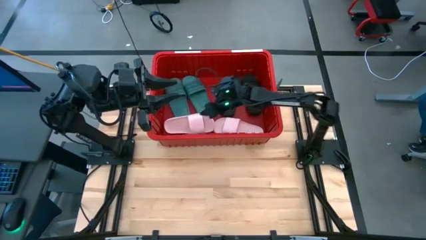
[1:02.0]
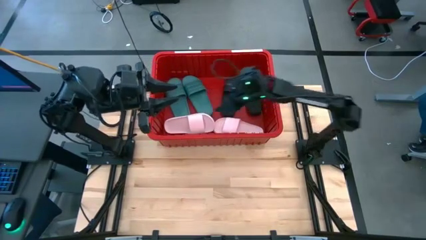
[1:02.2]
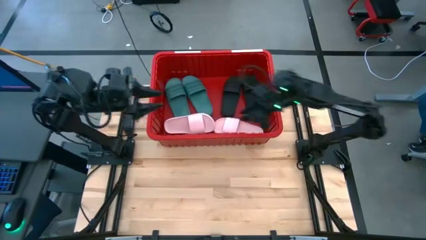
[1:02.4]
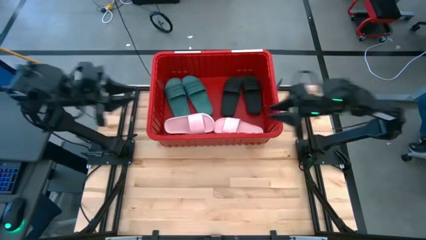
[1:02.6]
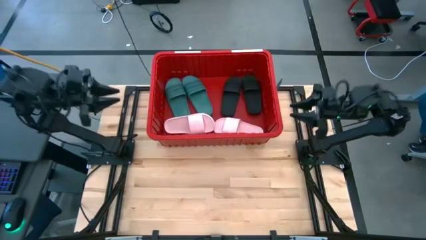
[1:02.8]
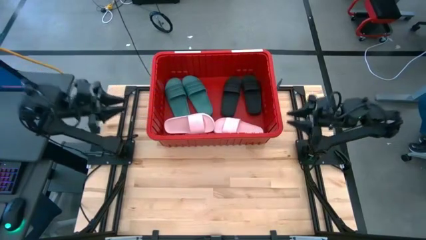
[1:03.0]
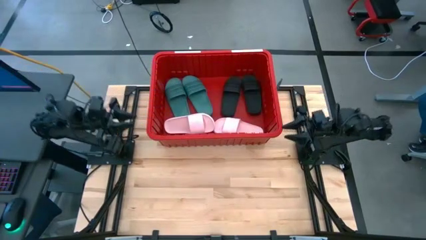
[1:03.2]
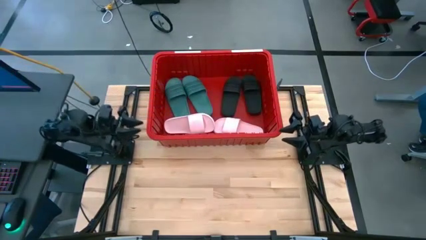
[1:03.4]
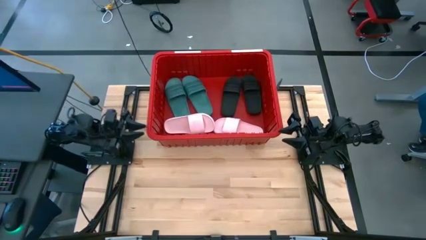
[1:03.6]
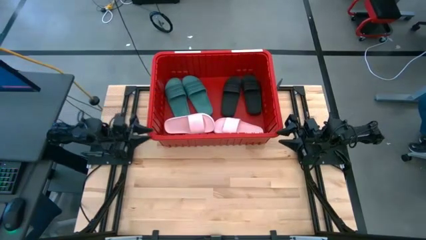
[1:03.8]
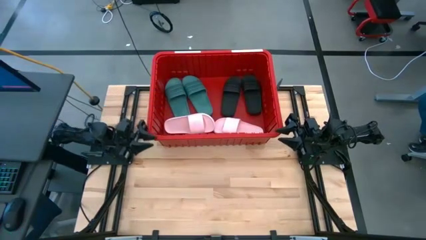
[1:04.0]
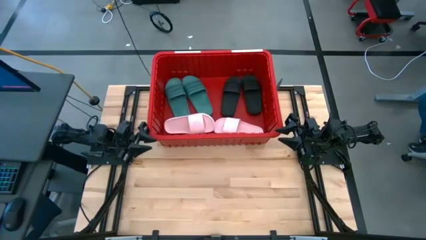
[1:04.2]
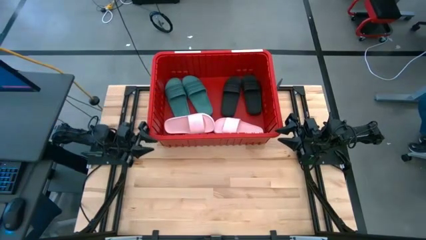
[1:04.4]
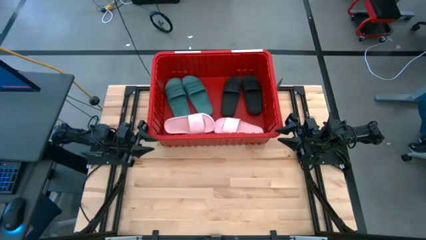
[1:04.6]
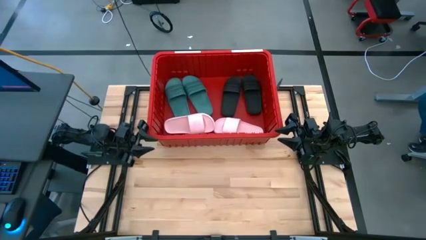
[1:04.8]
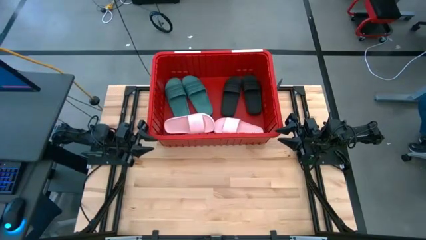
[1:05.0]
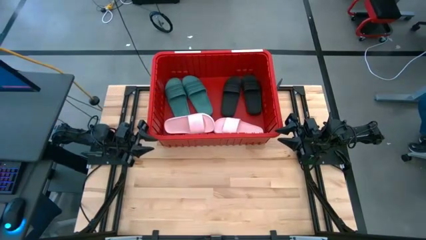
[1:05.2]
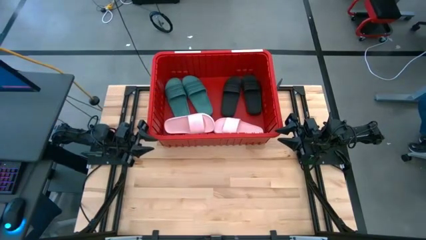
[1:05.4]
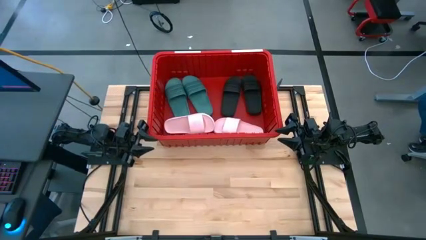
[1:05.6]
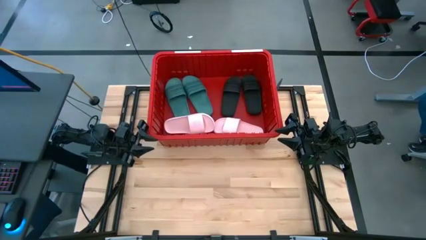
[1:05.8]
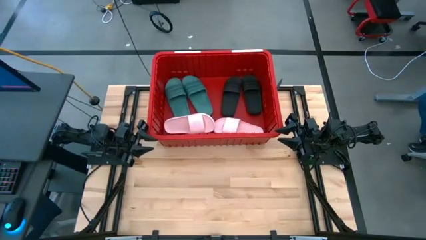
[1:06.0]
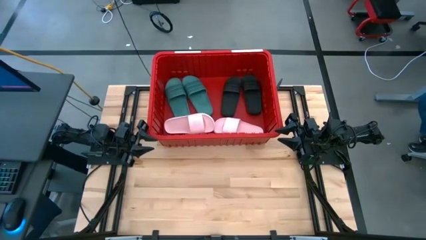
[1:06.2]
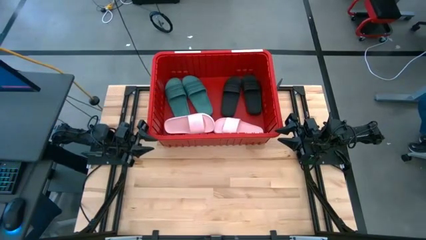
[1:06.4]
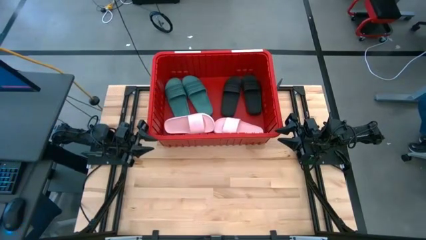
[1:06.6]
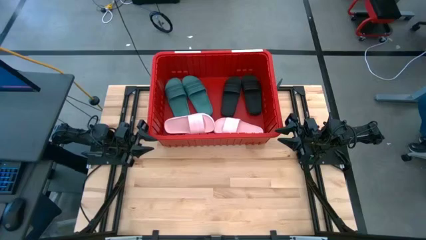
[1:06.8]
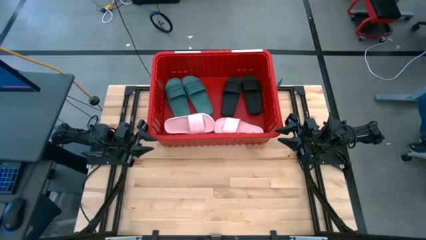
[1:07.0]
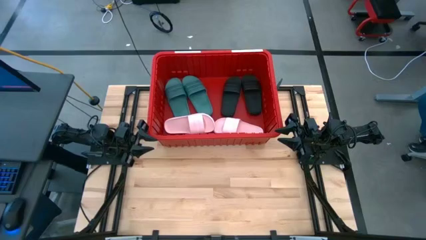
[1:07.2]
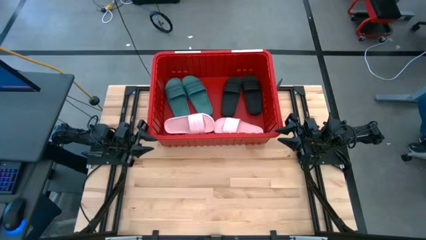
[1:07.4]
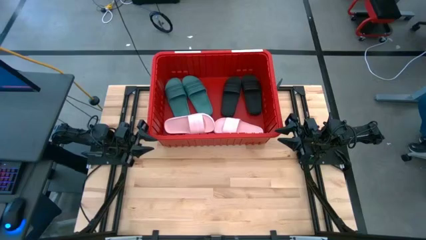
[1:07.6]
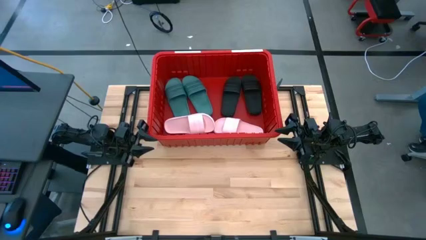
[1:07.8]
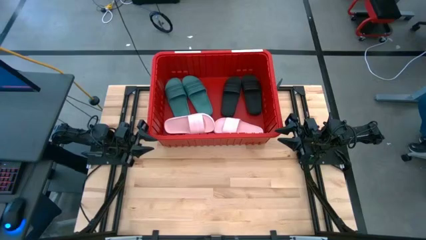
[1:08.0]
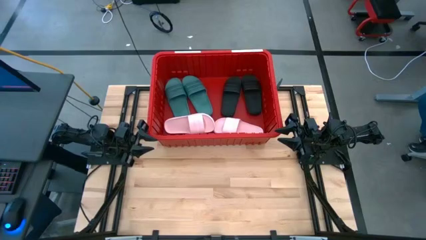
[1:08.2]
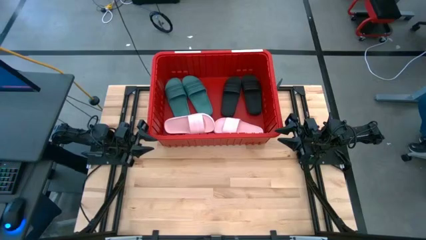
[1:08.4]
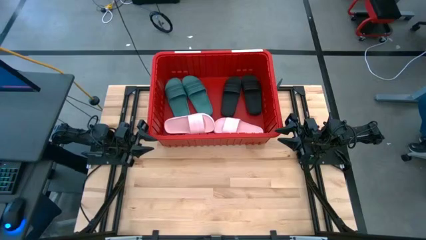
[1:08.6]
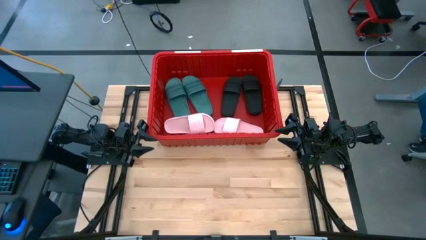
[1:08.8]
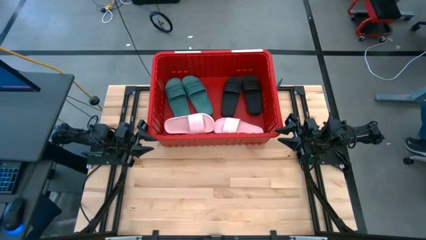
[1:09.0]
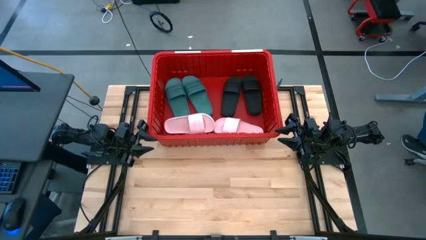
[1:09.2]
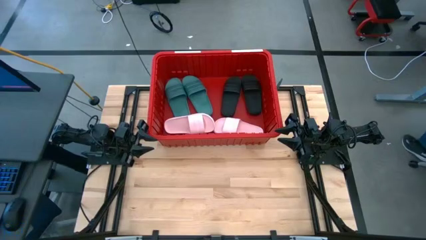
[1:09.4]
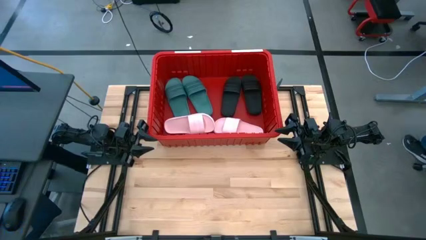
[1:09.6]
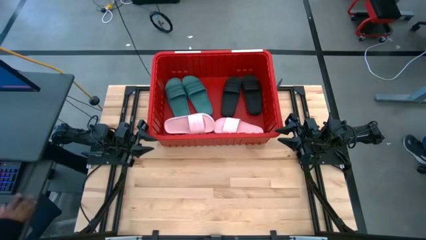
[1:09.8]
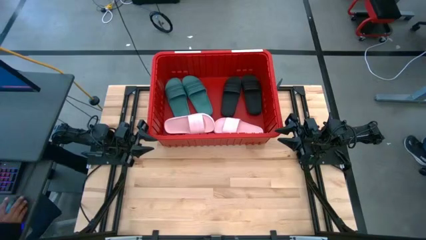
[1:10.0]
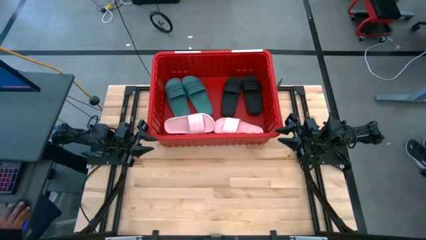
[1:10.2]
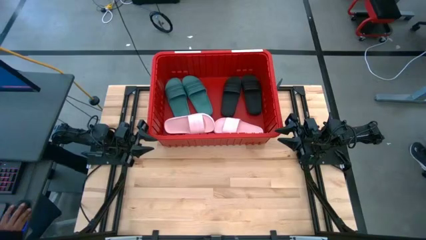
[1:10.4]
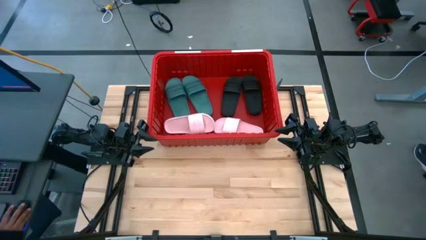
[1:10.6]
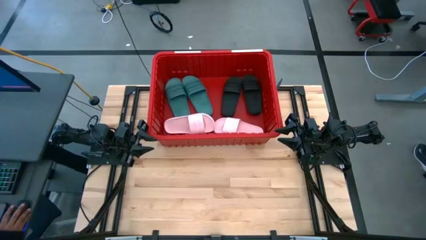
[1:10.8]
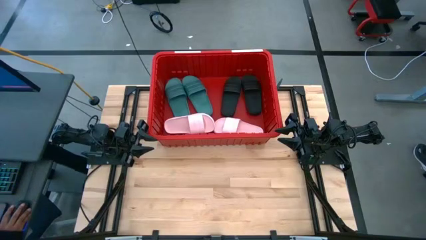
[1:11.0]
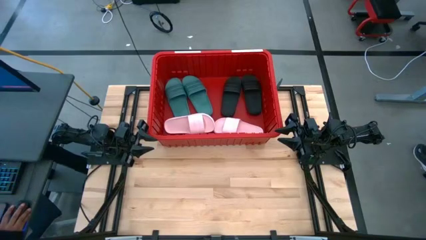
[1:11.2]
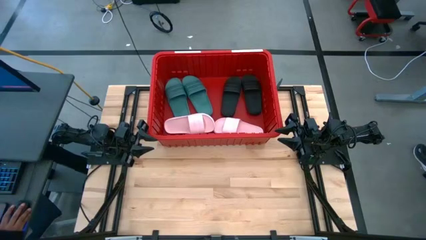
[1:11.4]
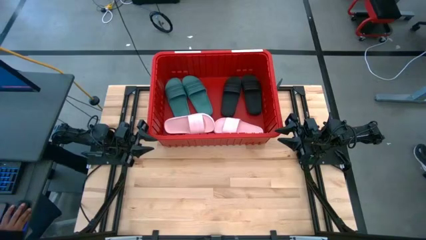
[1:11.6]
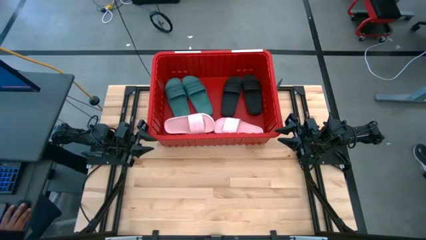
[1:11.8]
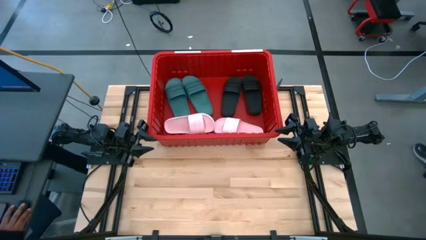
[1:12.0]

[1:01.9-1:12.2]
Task: Pick and place slides into bin
Return to Home Position

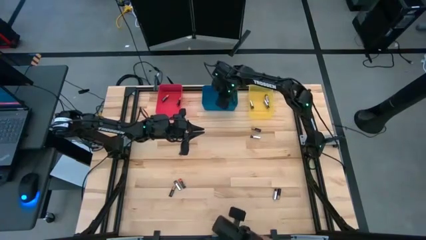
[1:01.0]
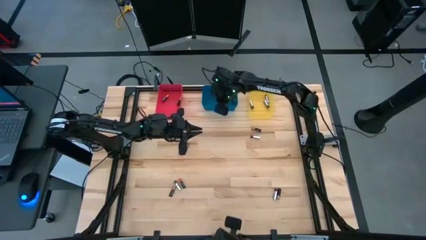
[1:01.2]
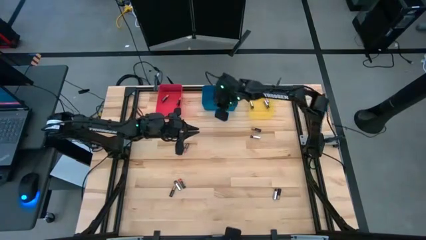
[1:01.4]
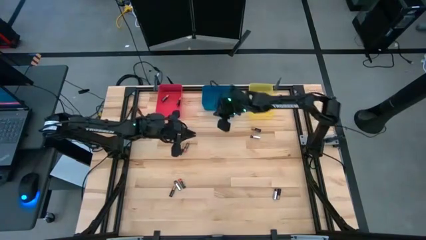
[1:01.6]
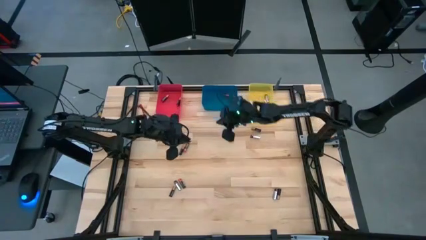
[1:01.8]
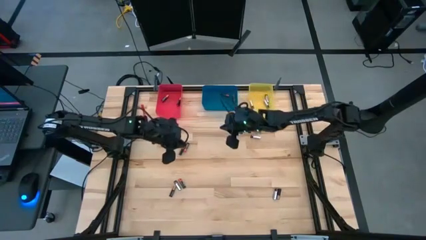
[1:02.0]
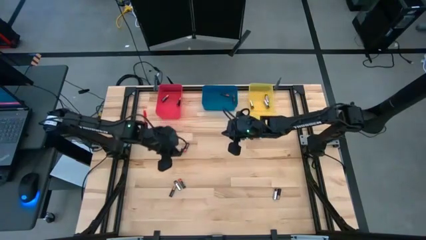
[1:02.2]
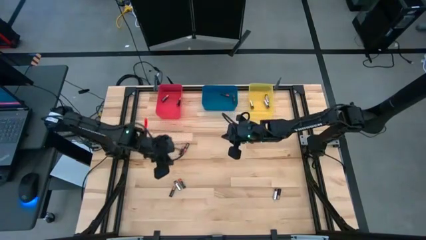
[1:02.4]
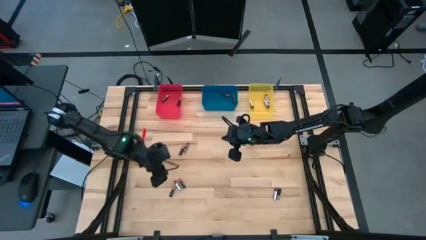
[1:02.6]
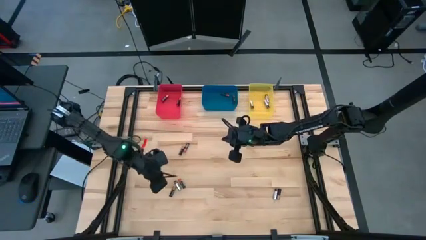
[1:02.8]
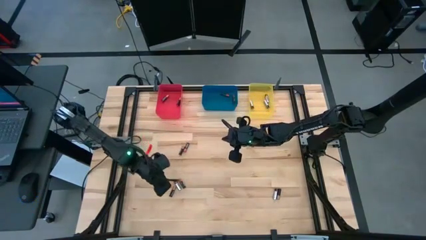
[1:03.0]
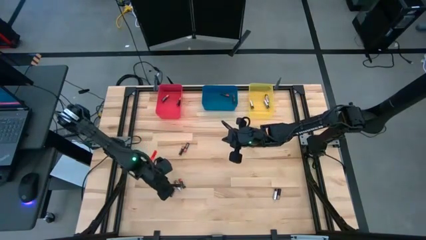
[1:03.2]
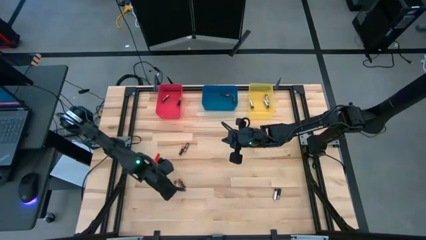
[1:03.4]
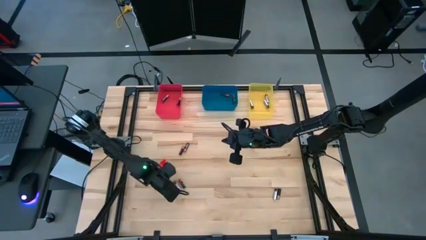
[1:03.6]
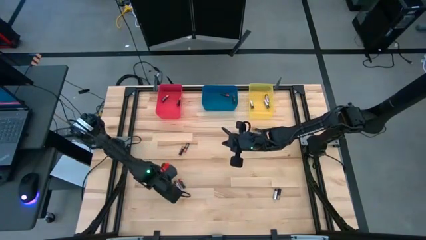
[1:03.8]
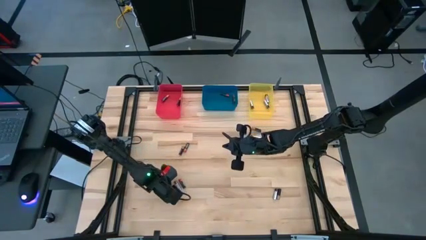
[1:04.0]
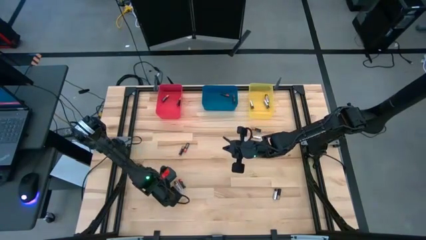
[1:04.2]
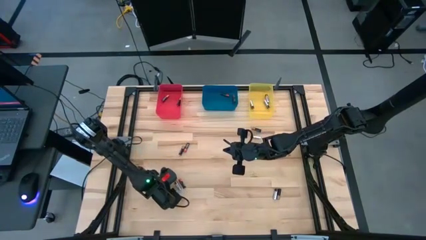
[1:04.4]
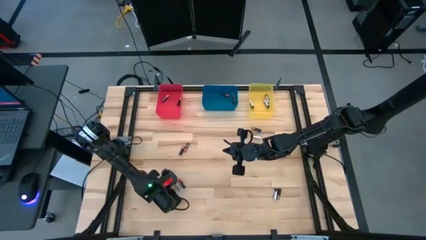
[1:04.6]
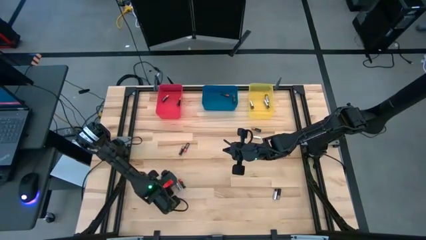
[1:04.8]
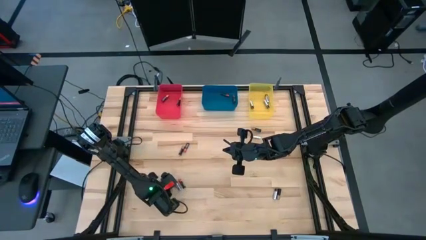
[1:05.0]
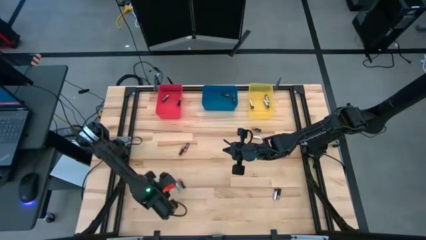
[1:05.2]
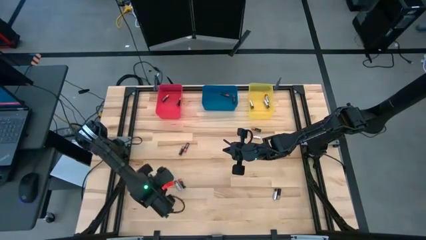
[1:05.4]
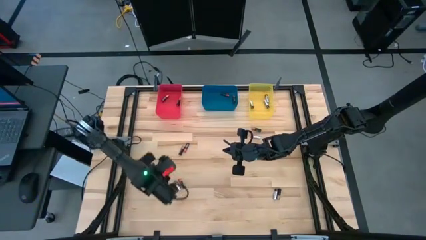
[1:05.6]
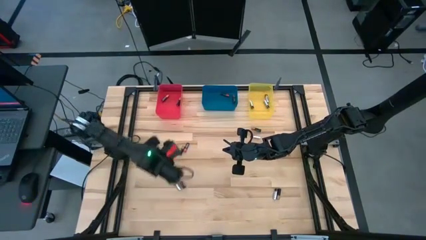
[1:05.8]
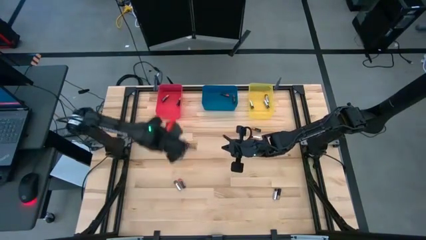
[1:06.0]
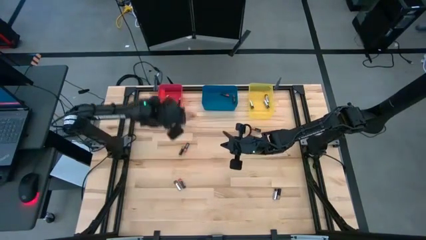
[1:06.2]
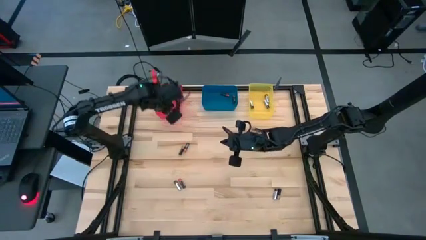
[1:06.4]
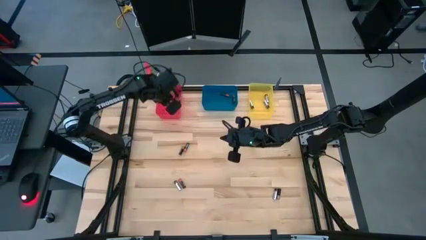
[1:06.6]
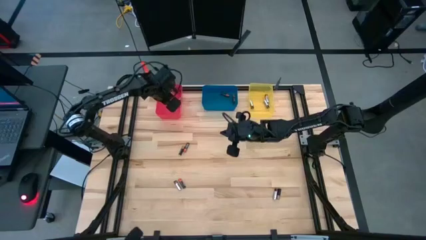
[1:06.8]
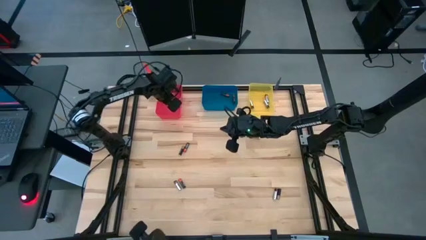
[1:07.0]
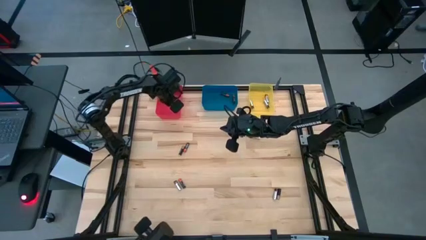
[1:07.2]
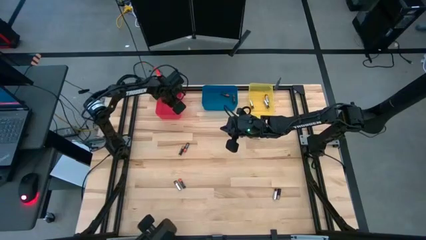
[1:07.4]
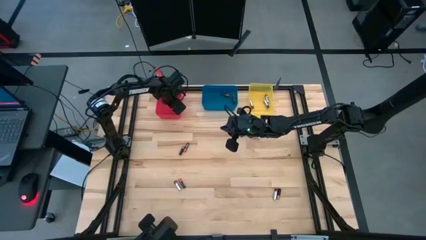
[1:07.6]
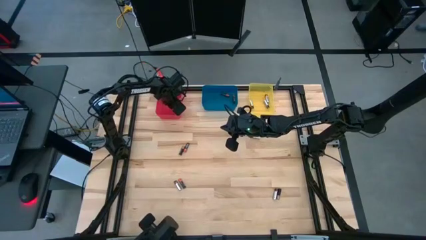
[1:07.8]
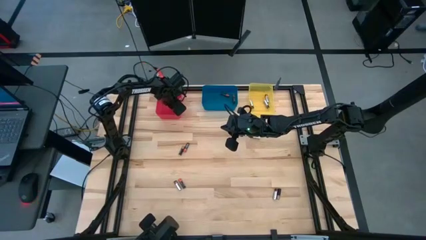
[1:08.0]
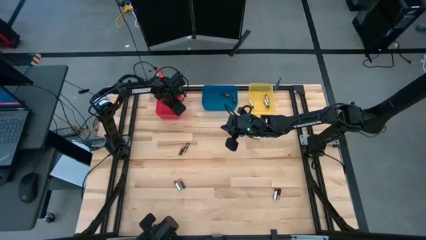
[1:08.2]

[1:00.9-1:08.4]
Task: Sort batteries
Put the brown battery into the red bin
